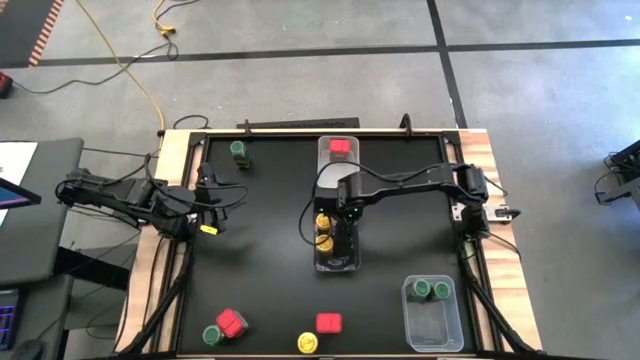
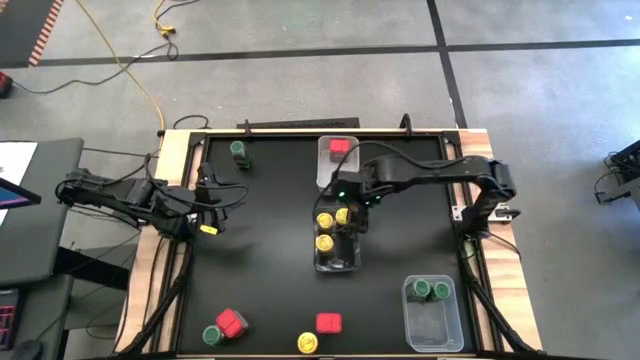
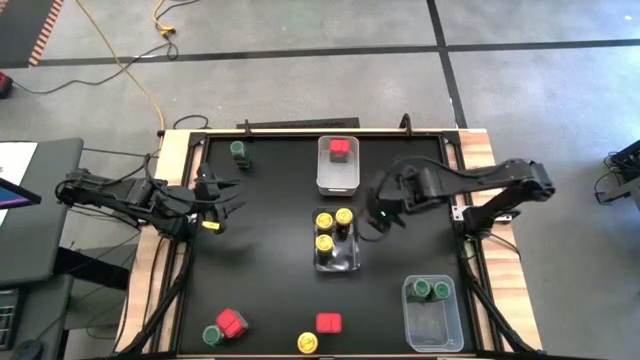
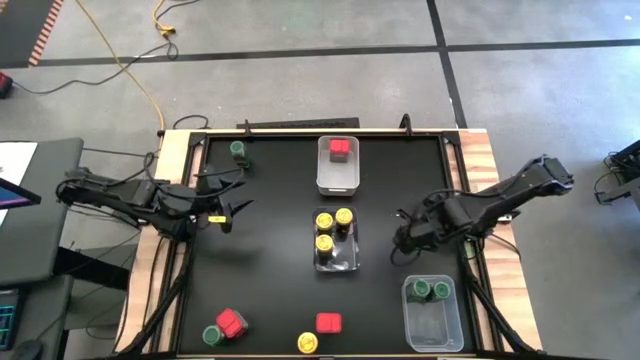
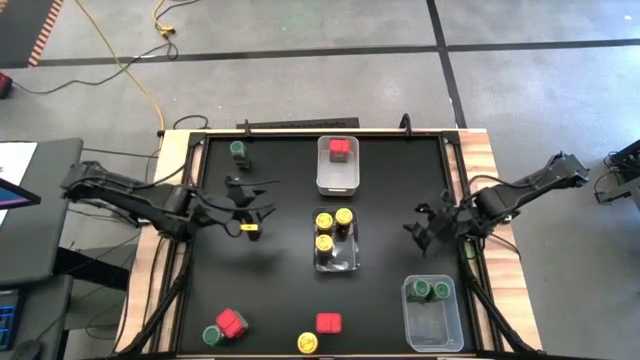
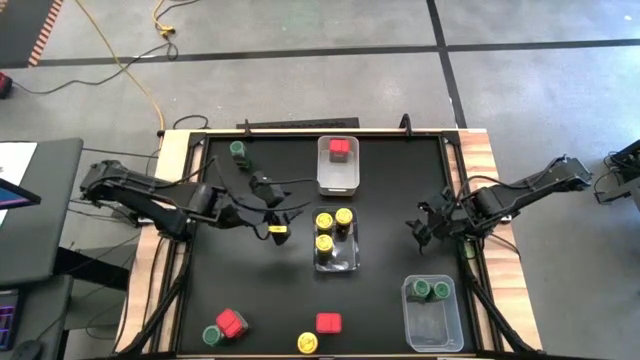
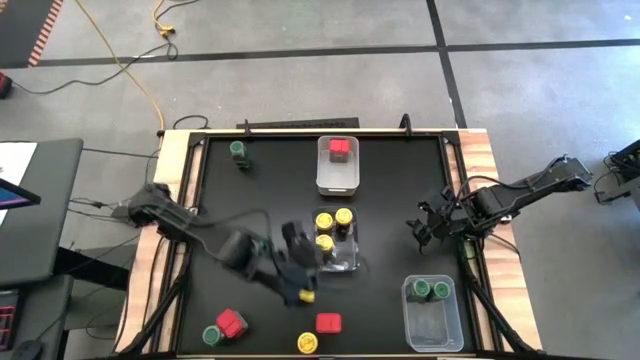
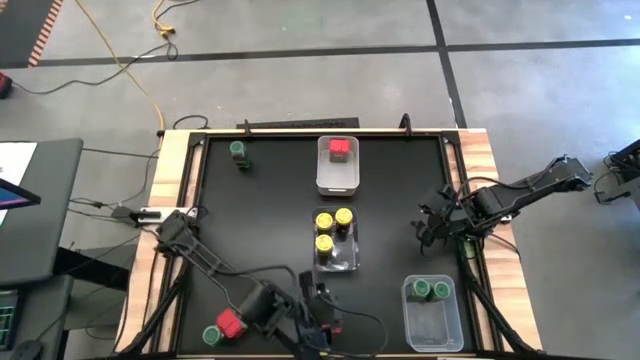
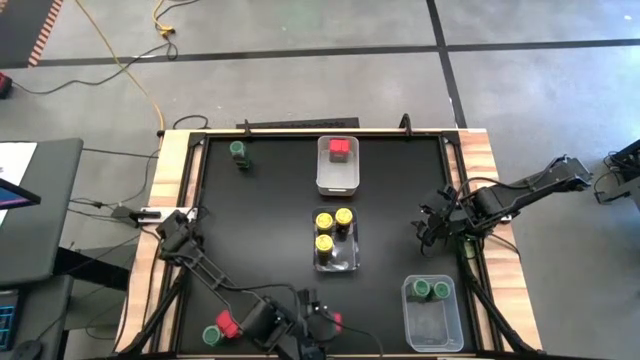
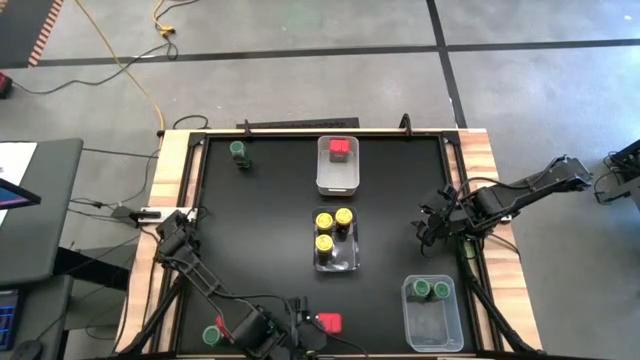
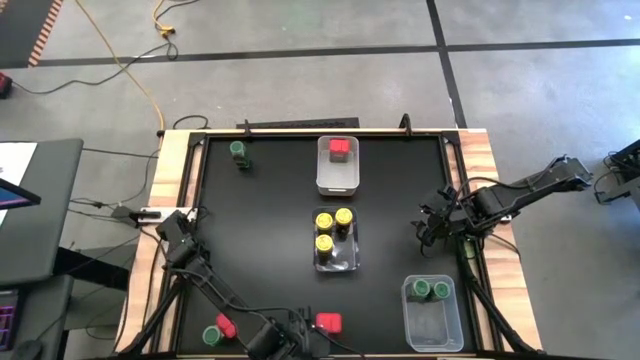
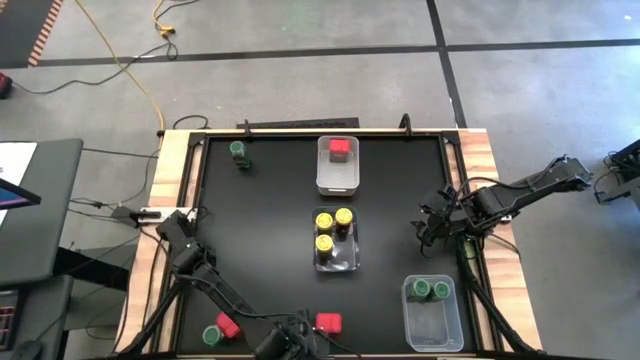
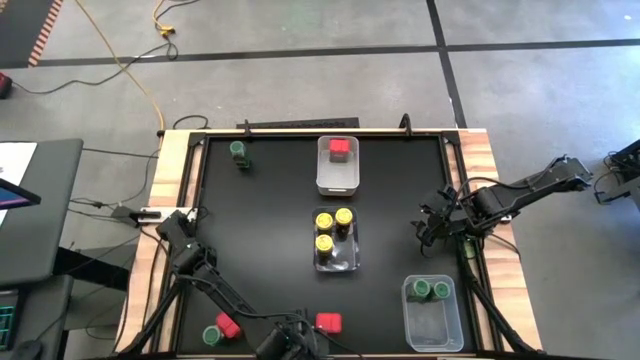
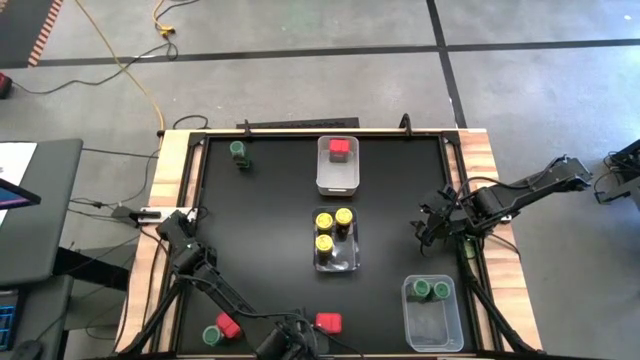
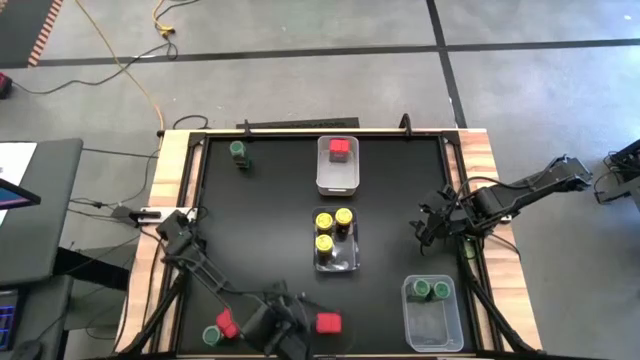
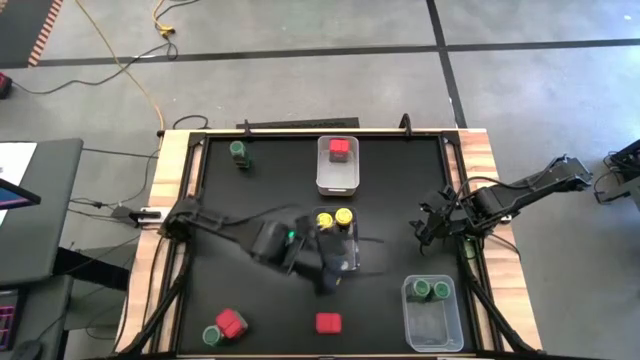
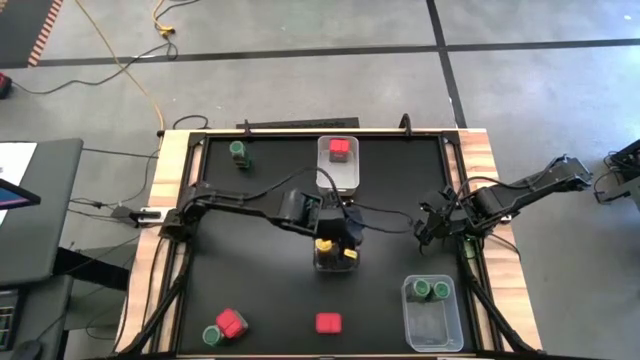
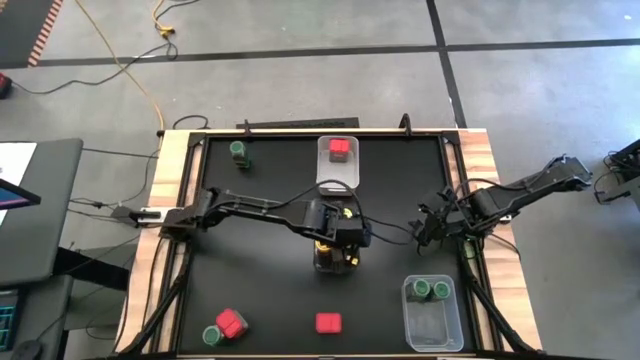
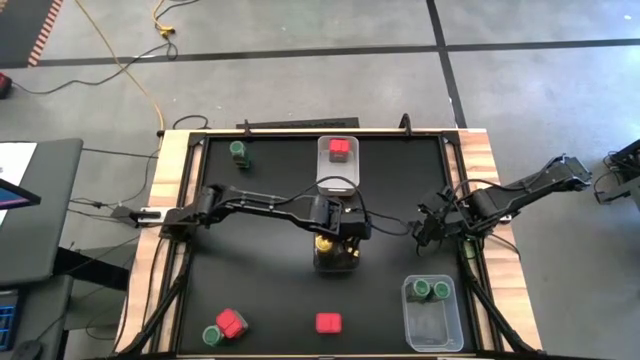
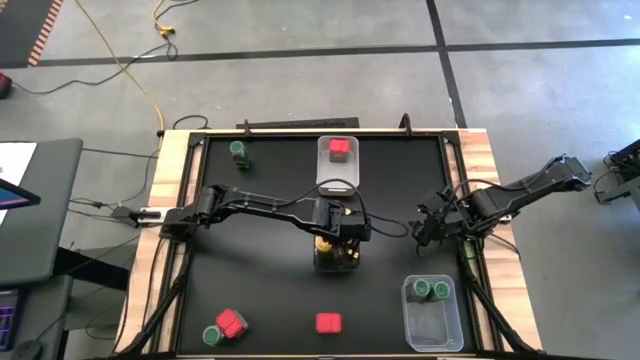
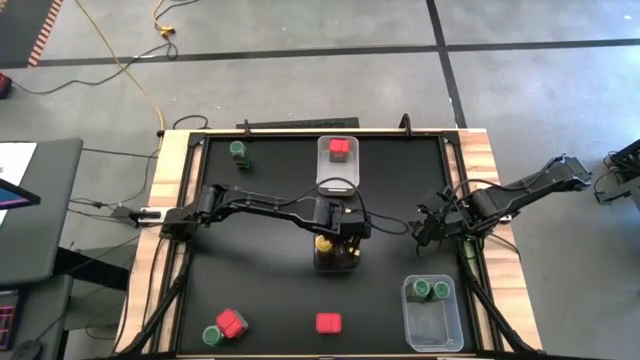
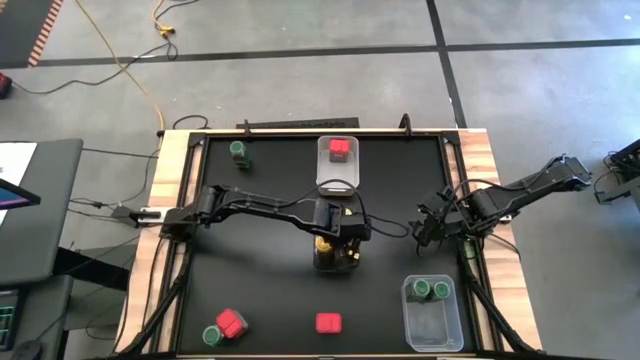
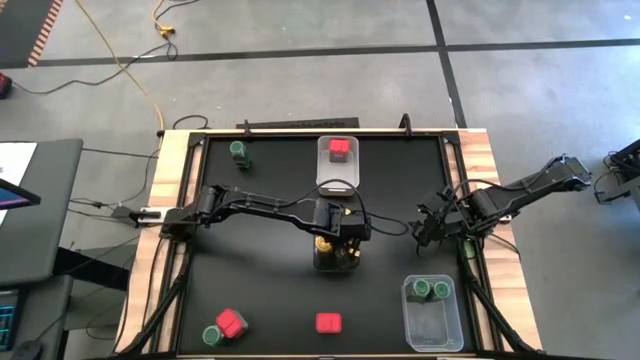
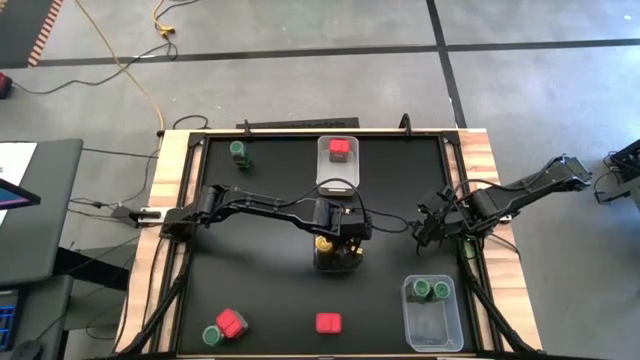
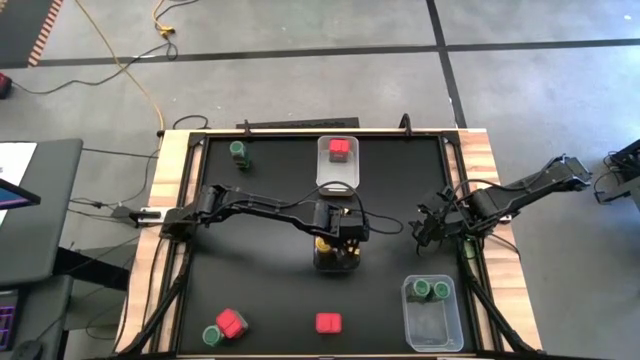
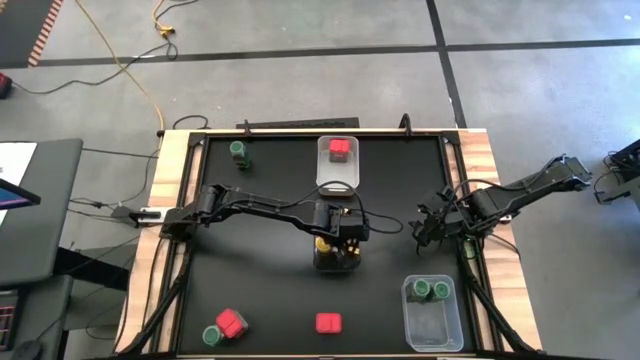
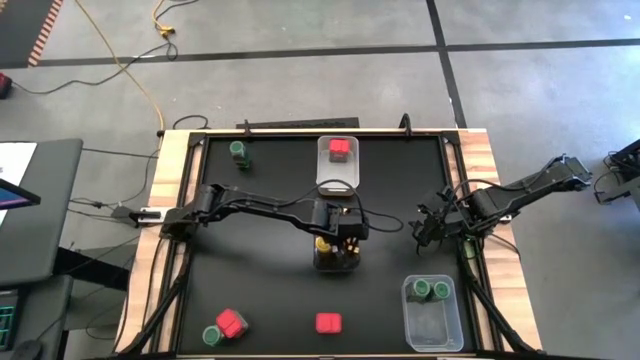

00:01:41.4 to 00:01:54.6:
Task: Sort spices by type
Put the yellow seasoning bottle into the black bin

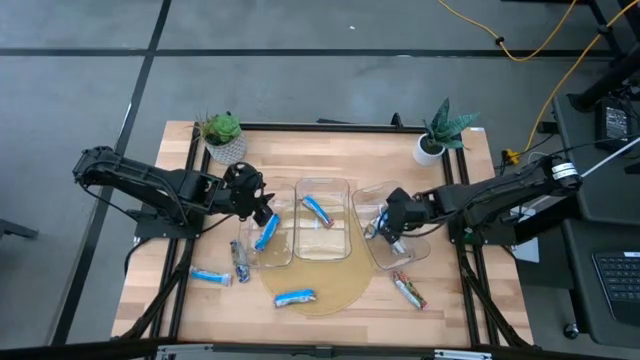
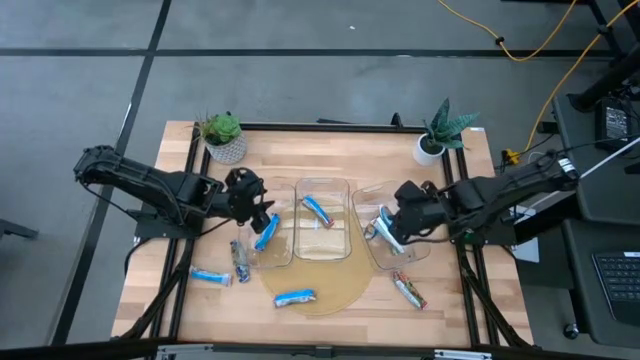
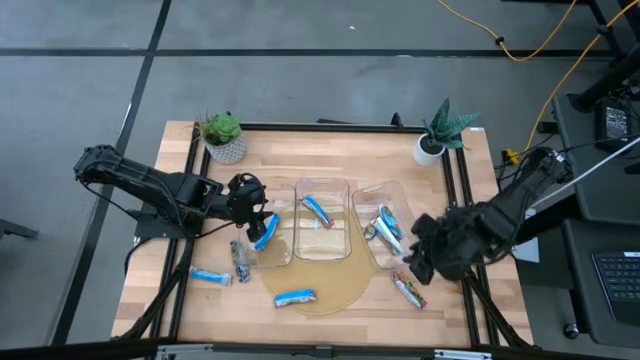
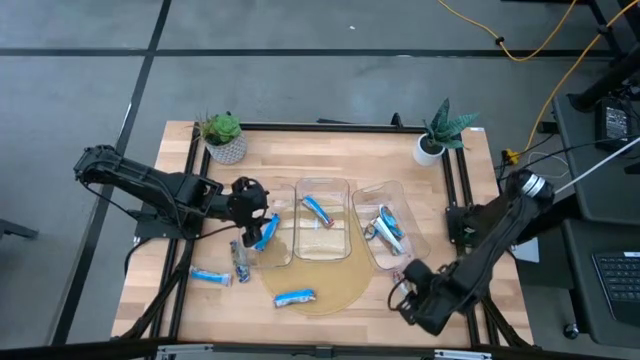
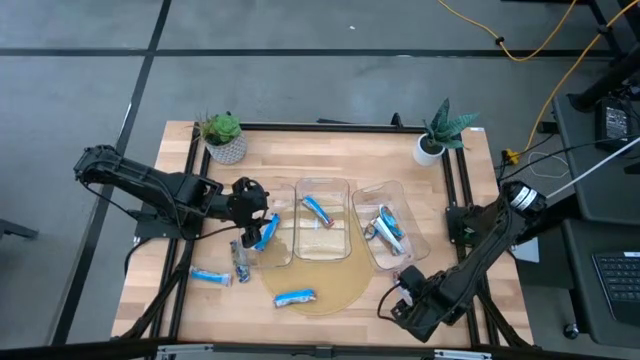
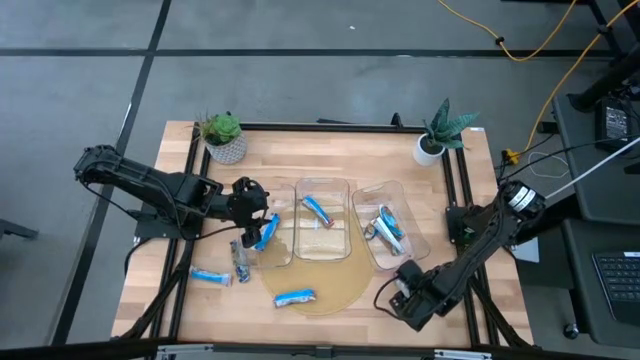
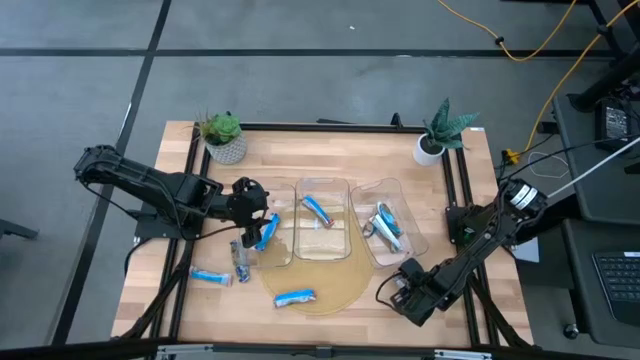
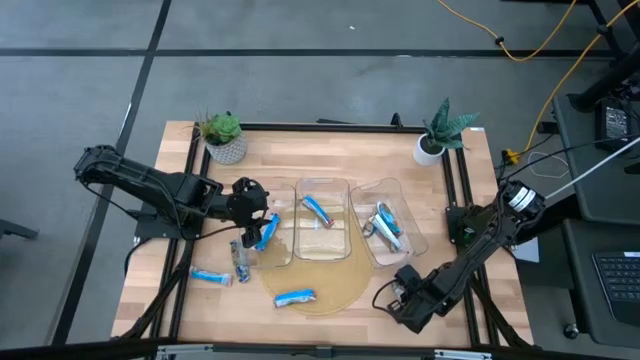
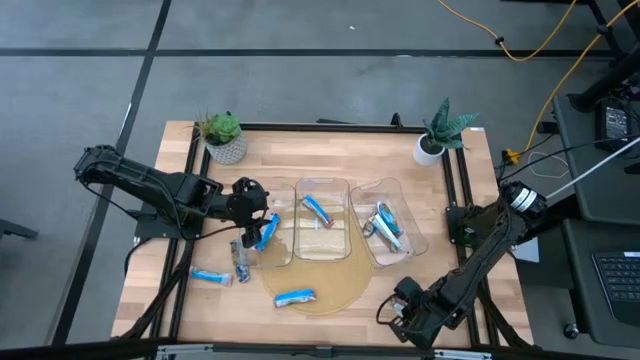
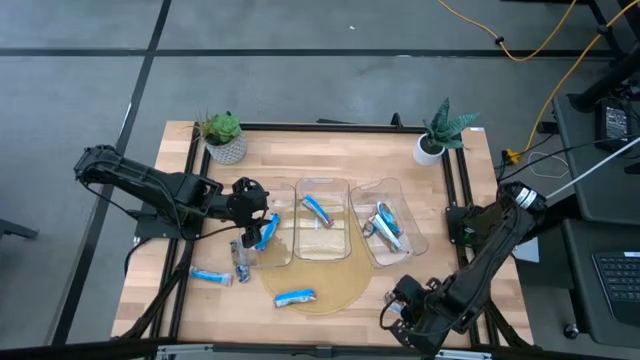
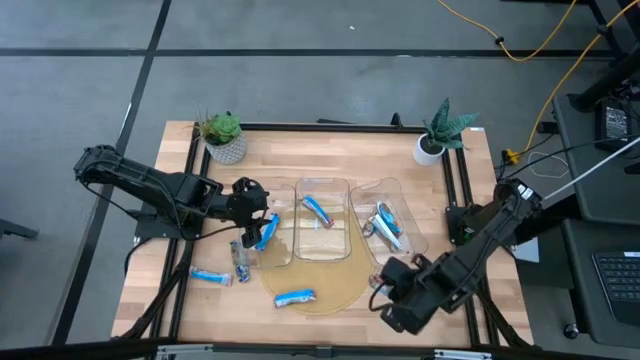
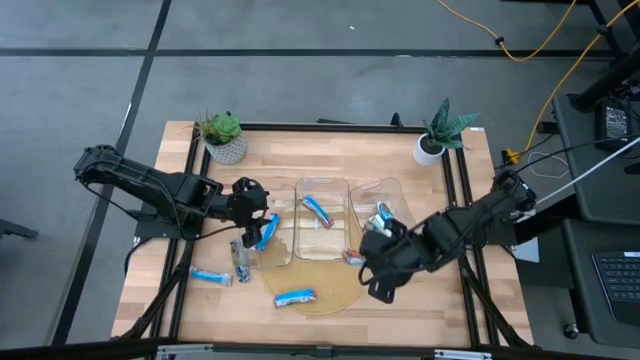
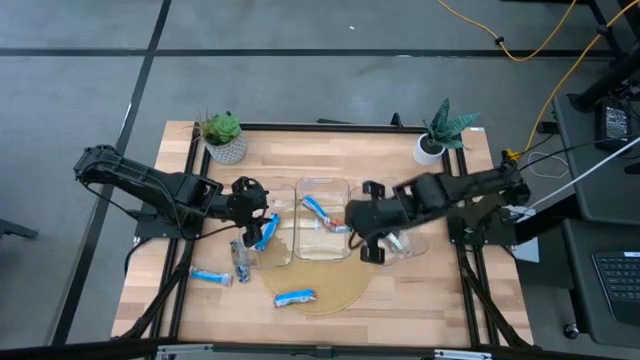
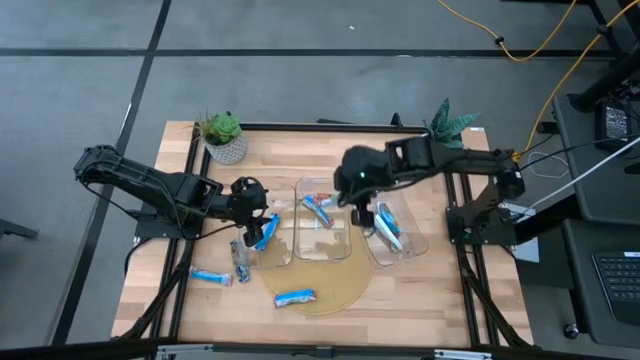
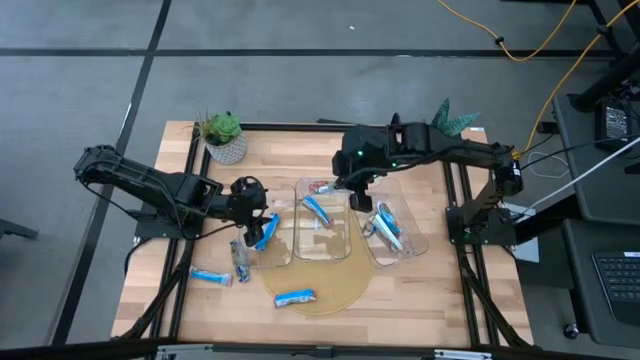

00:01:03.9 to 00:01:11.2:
Task: Pick and place Granola Bars by type
Put the red granola bar into the middle transparent bin
